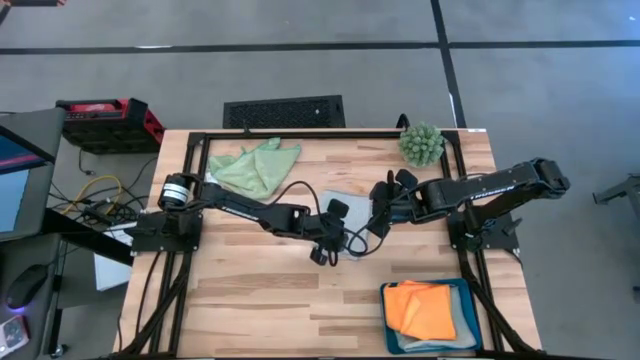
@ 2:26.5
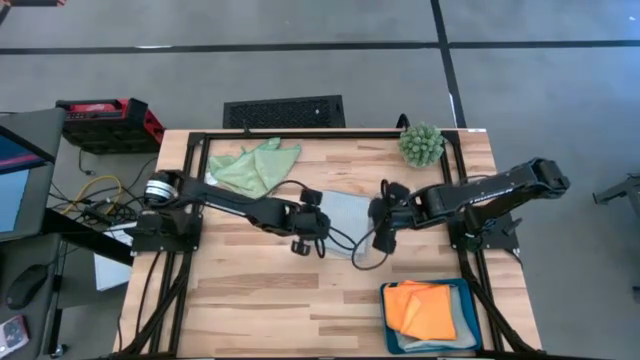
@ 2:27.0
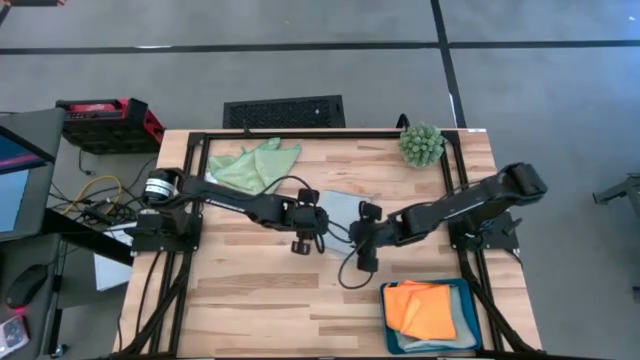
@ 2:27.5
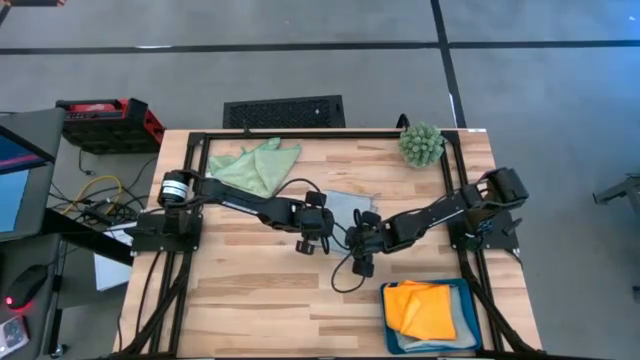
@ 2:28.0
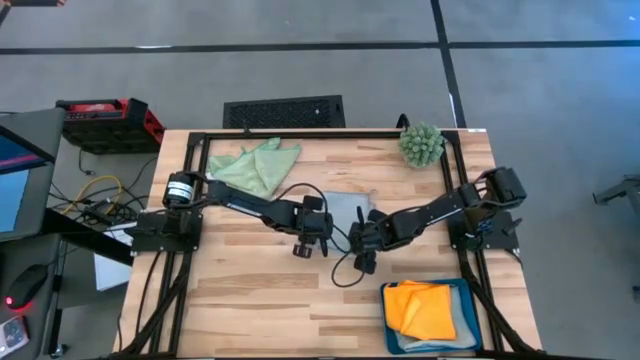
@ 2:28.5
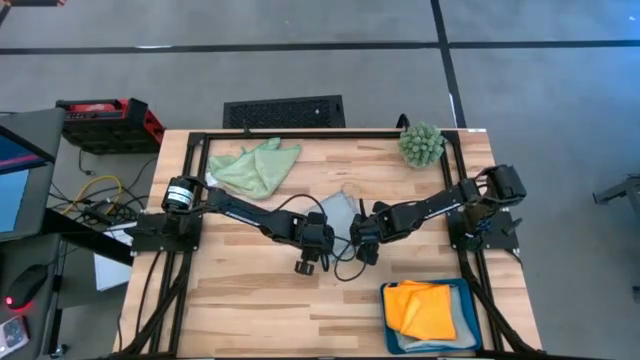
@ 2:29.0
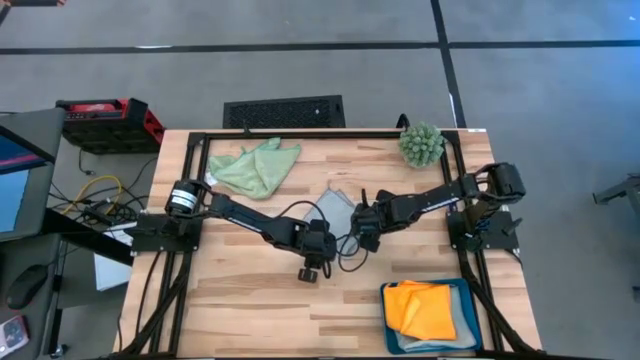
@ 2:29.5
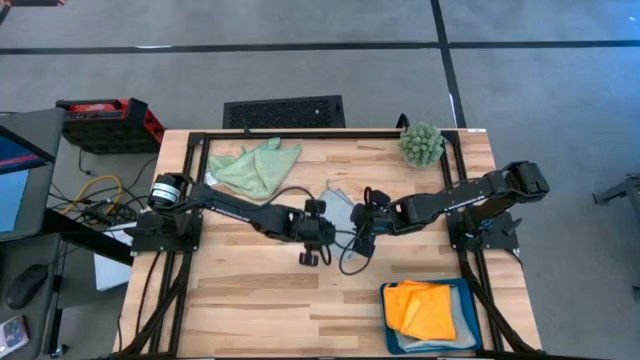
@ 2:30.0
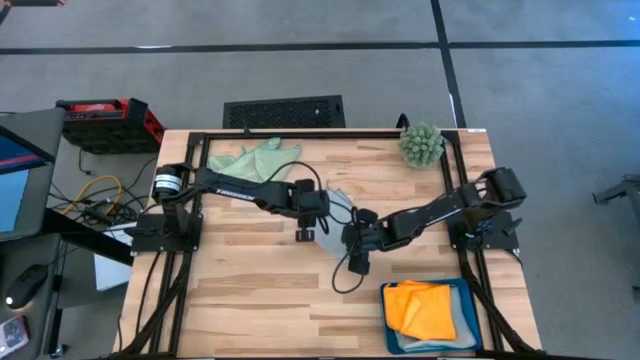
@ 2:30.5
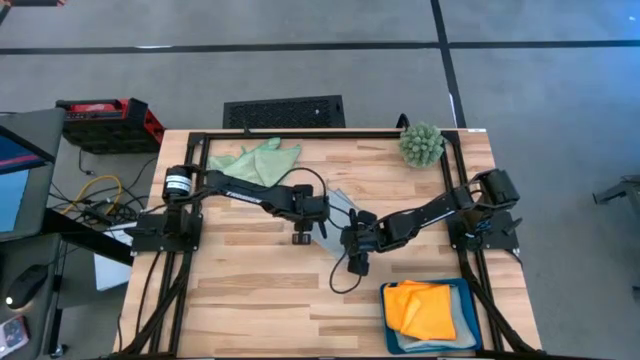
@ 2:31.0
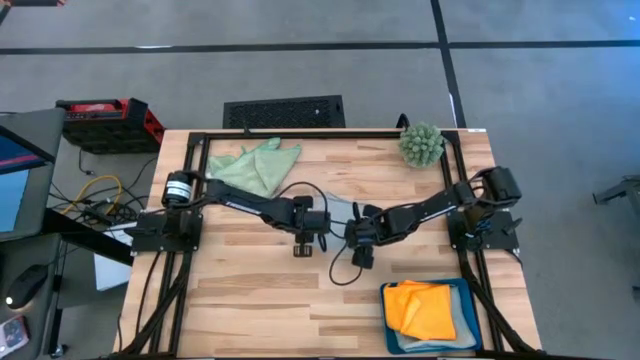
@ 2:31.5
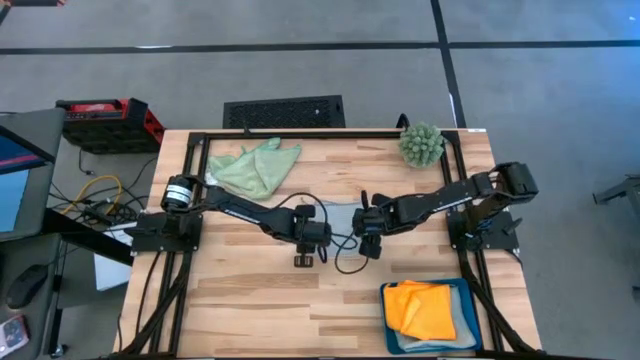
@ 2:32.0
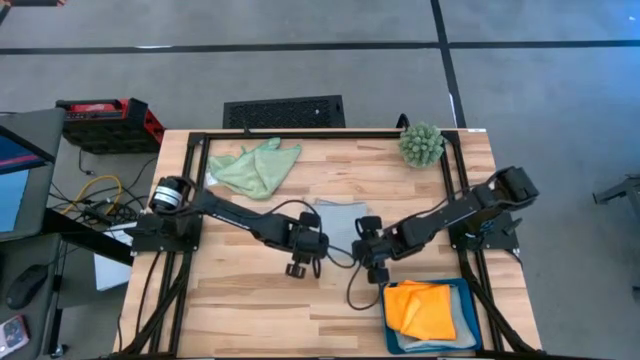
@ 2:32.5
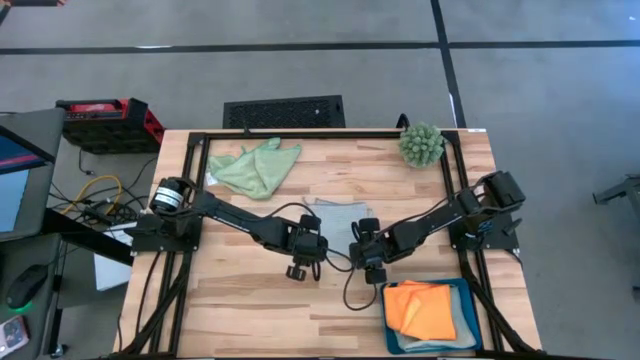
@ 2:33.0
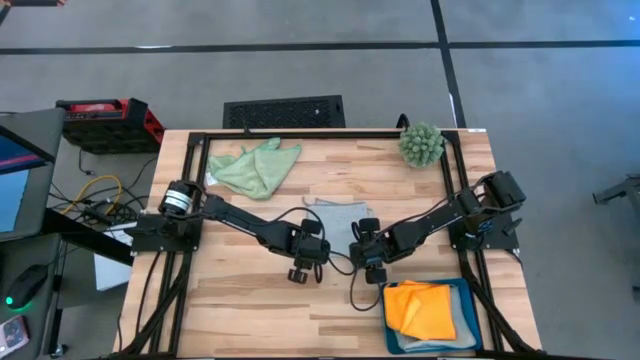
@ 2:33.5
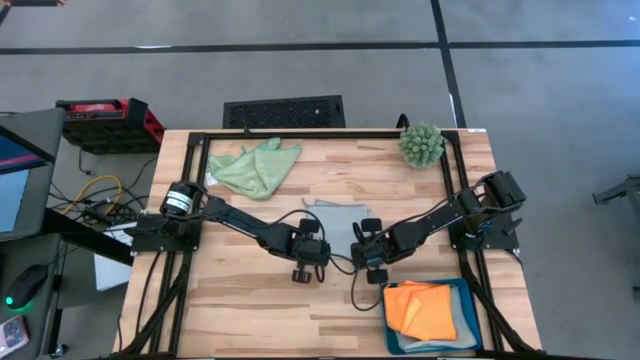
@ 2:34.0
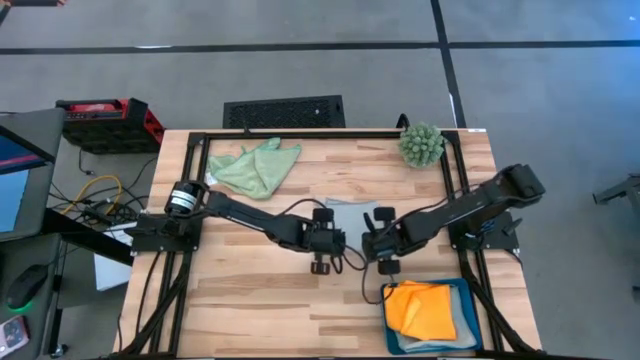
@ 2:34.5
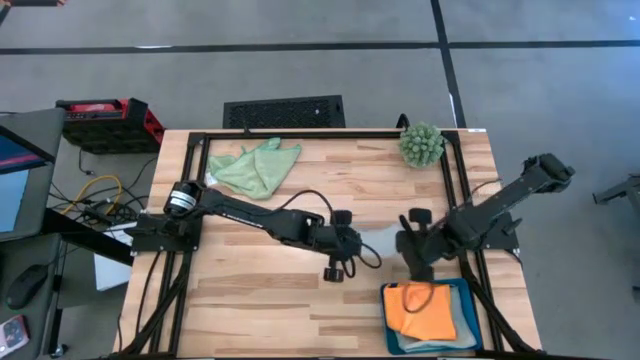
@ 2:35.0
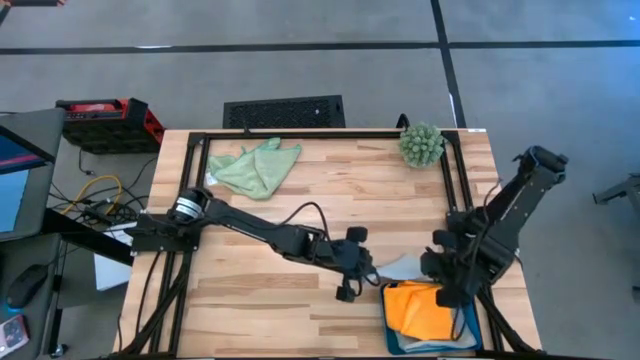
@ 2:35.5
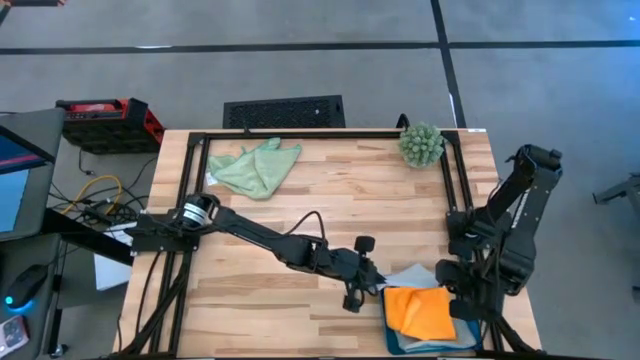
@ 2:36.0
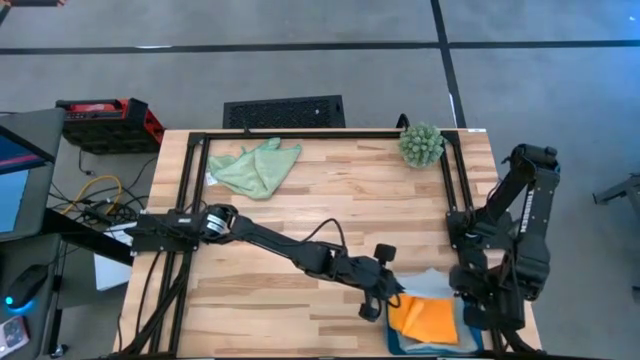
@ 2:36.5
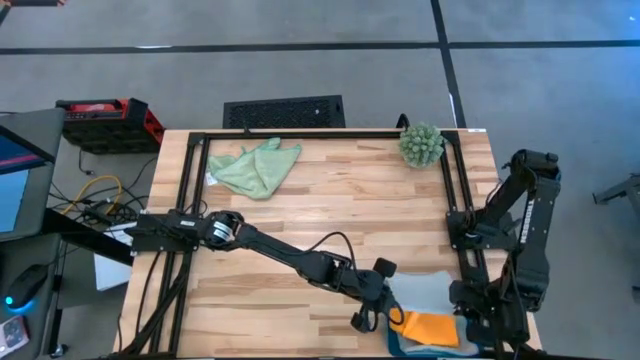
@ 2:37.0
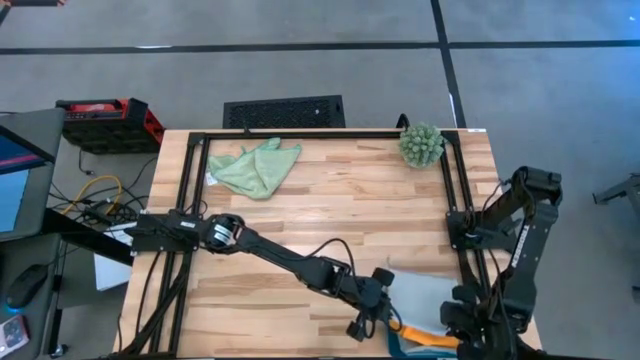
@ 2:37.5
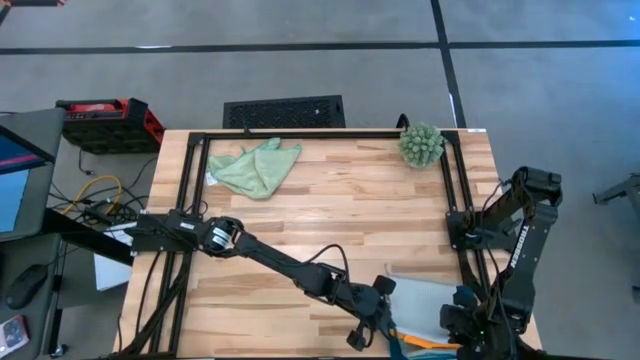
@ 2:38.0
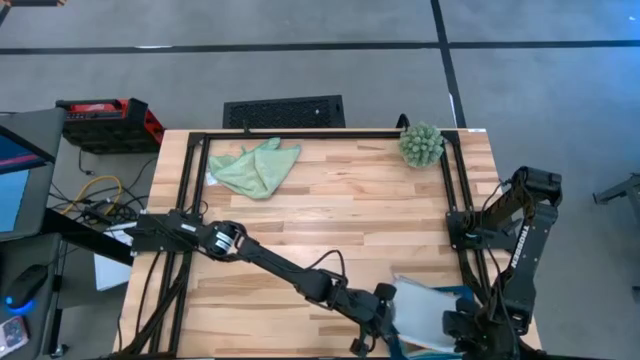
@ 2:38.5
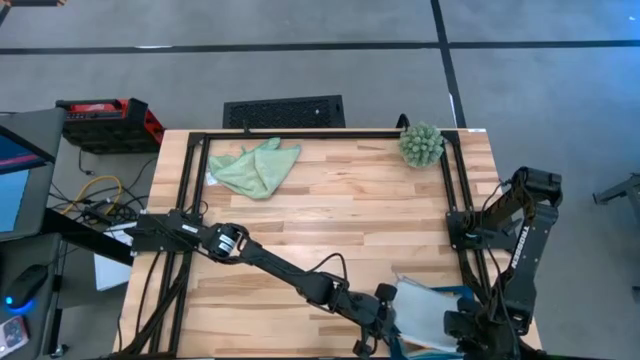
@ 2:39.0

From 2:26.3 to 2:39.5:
Task: Fold microfiber towels
Put the folded gray towel into the blue bin

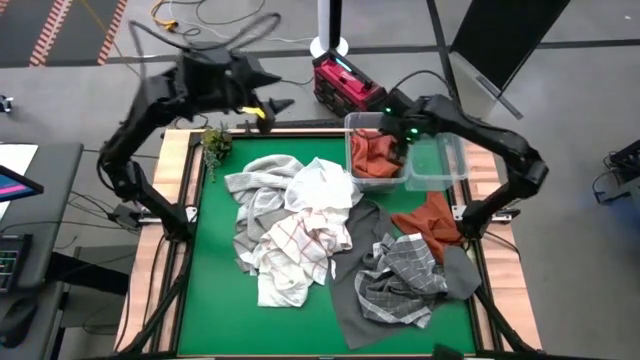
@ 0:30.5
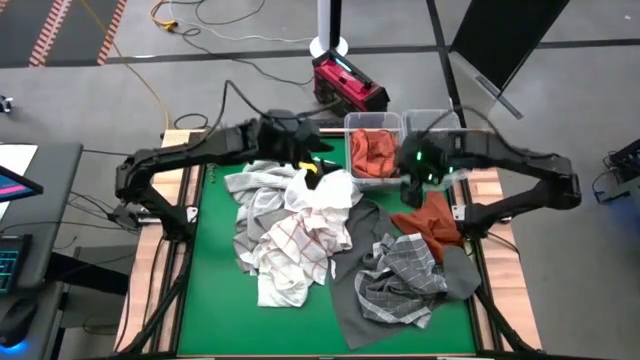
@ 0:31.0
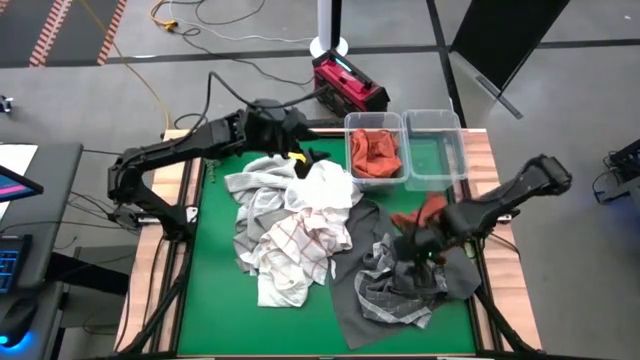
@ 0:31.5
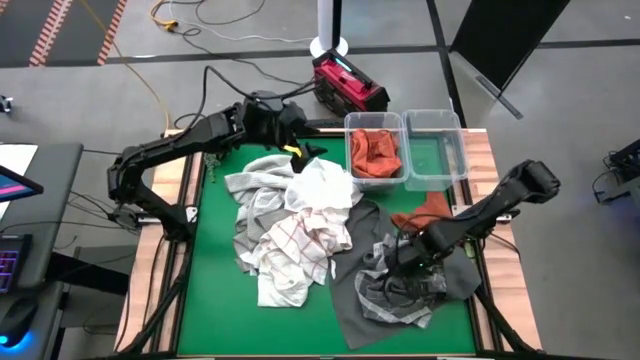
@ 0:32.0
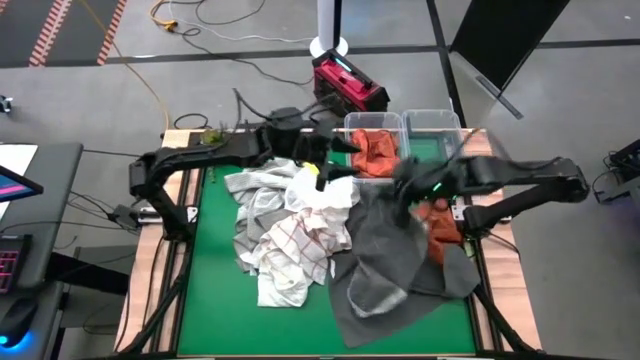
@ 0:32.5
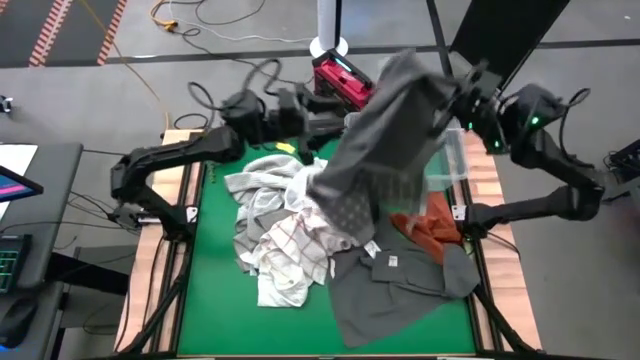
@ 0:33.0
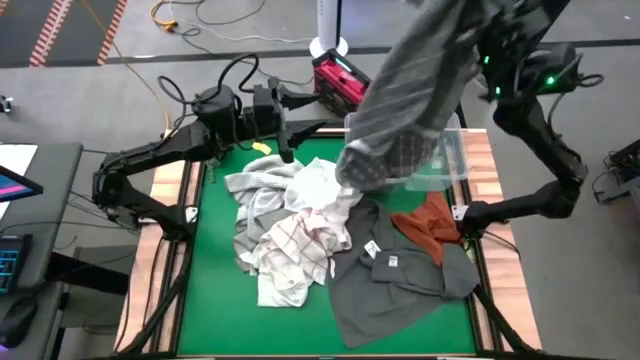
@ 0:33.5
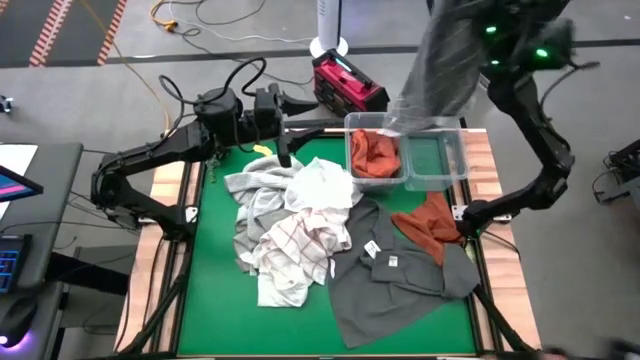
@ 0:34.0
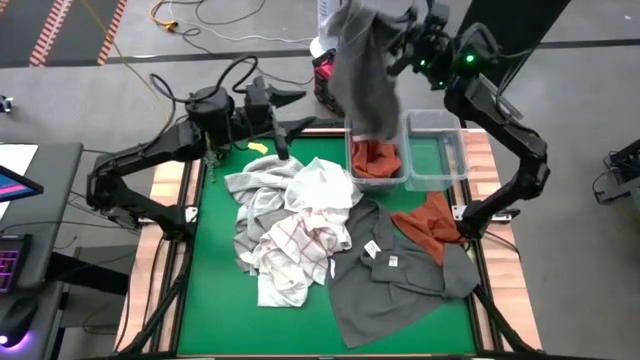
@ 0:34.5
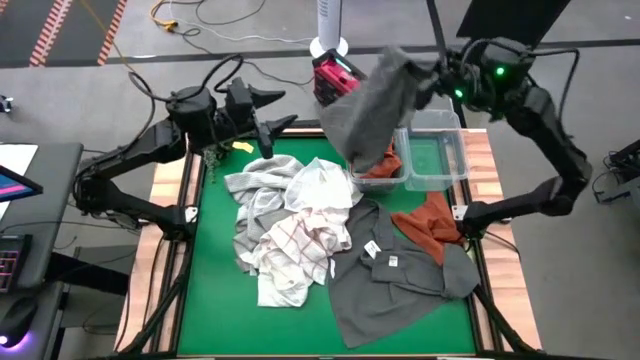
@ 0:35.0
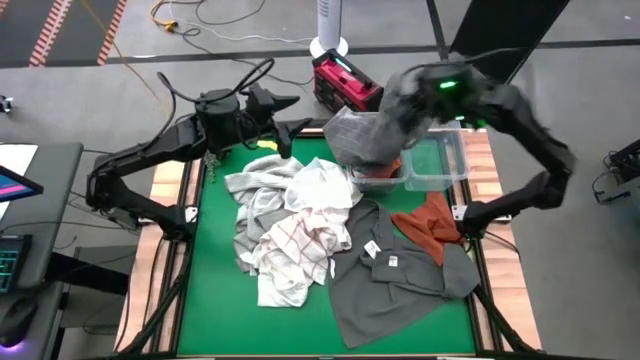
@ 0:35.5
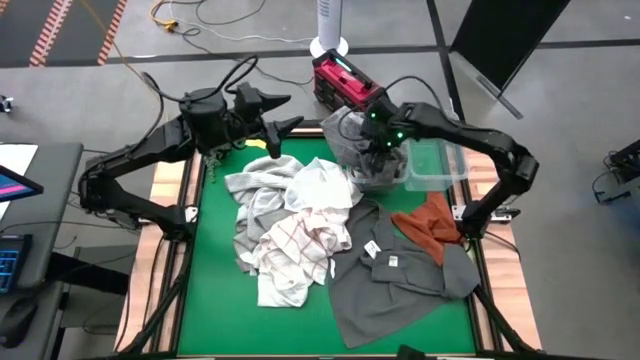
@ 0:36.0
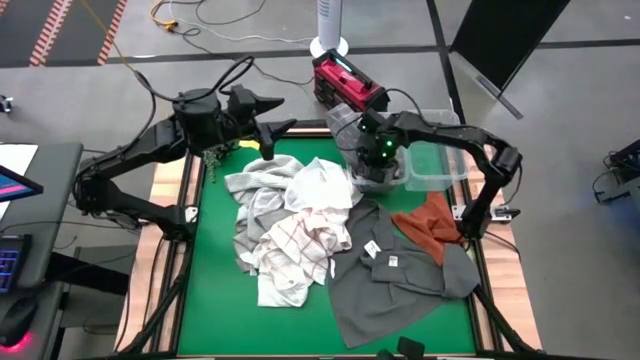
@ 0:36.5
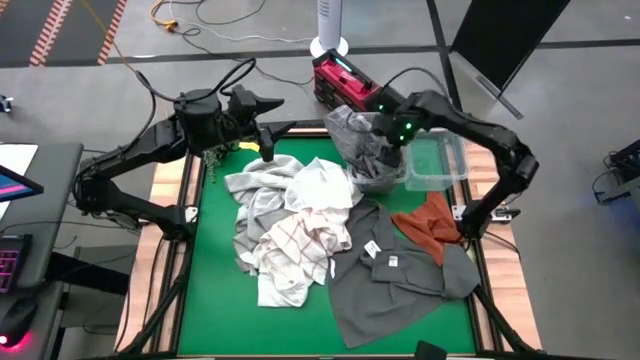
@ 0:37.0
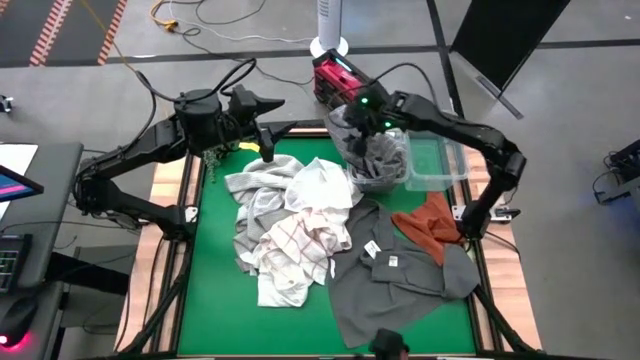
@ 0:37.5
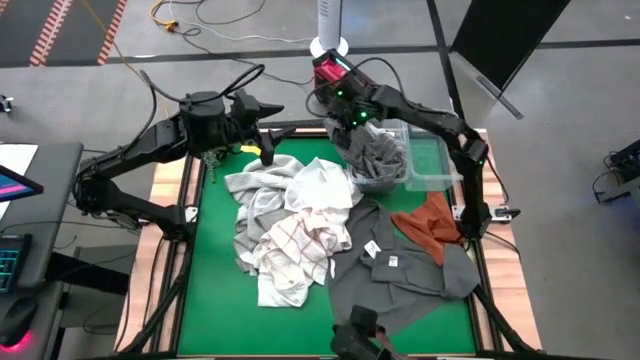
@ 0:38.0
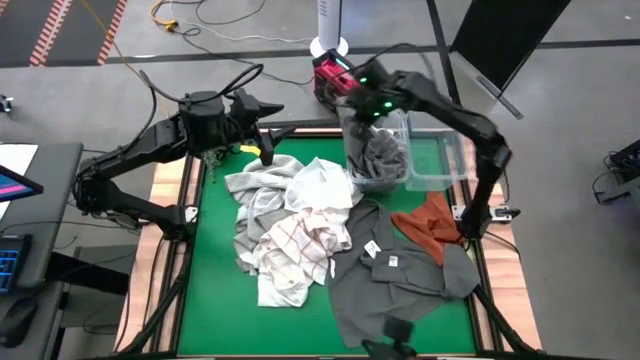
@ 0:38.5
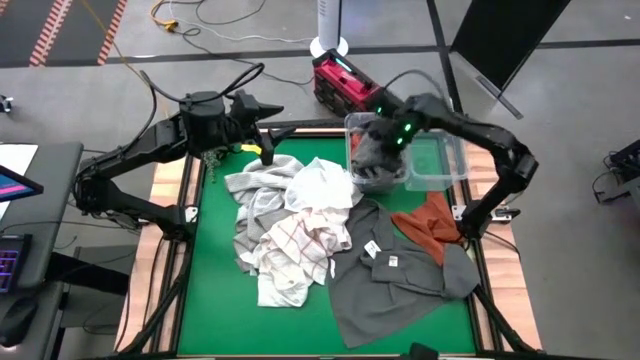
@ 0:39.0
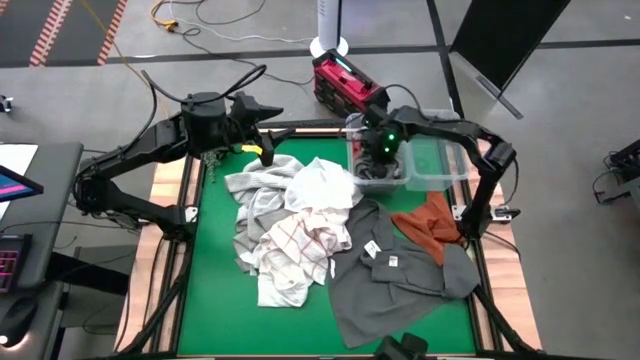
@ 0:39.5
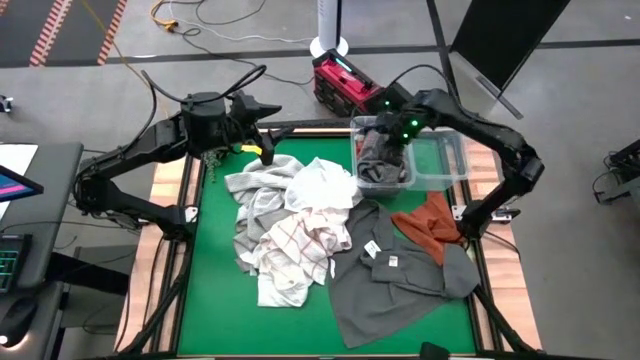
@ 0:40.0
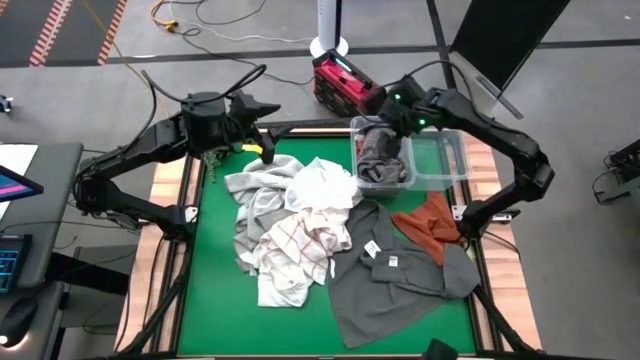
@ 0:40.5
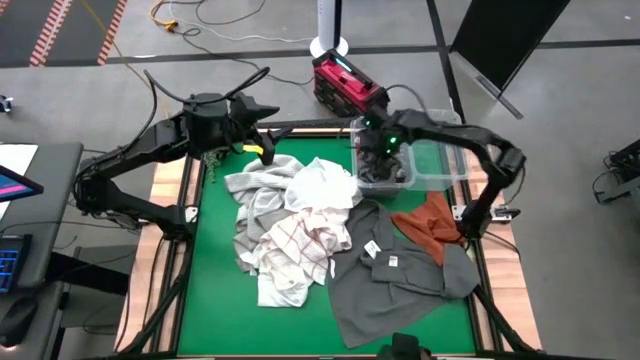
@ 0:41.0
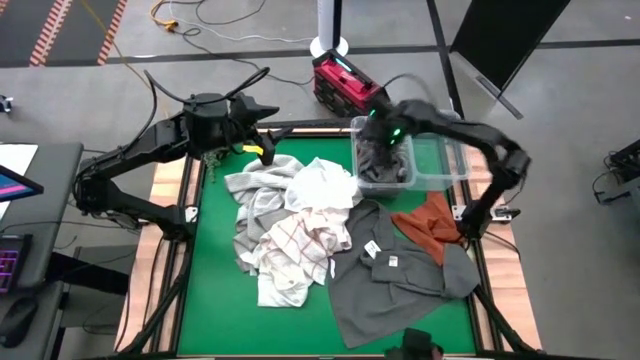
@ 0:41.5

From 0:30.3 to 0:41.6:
Task: Sort towels by color in basket
Put the dark gray checkered towel into the left transparent bin
